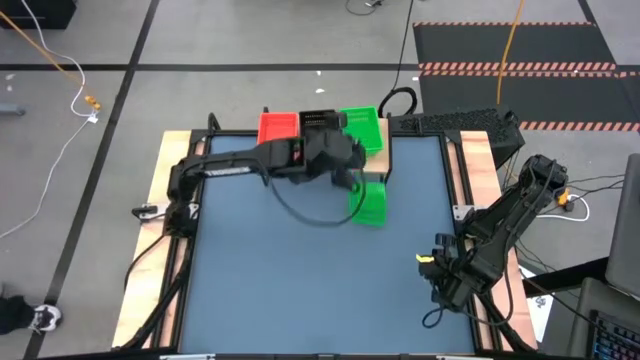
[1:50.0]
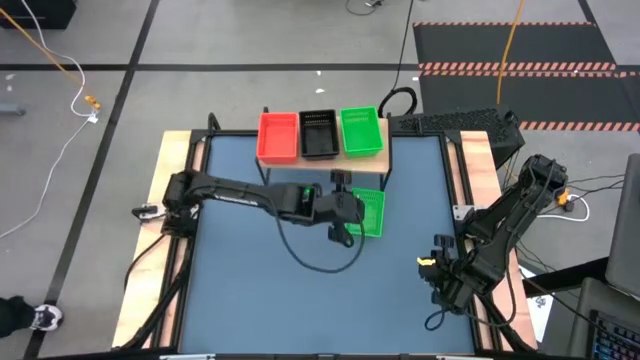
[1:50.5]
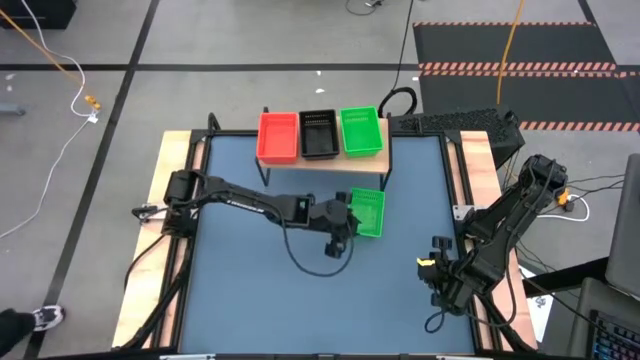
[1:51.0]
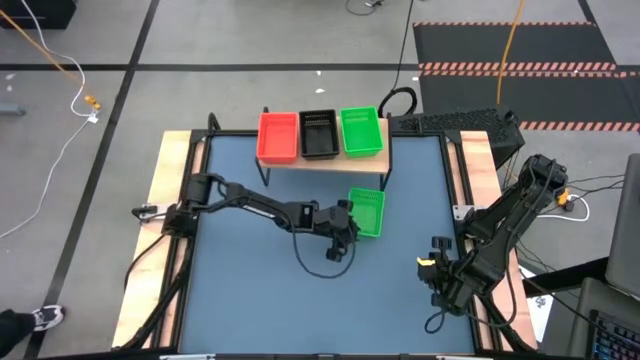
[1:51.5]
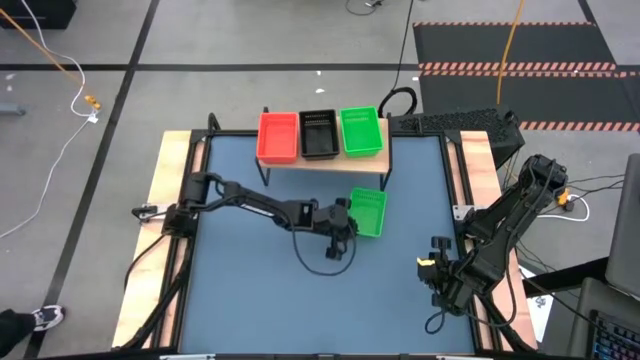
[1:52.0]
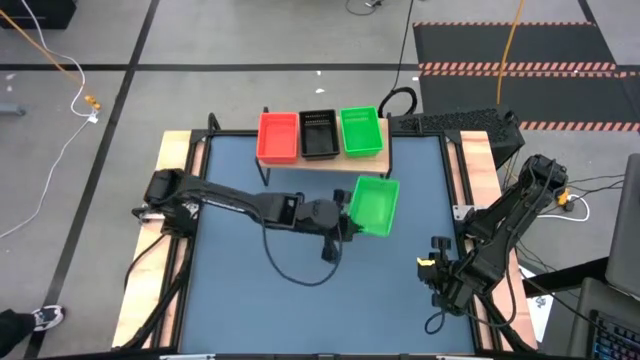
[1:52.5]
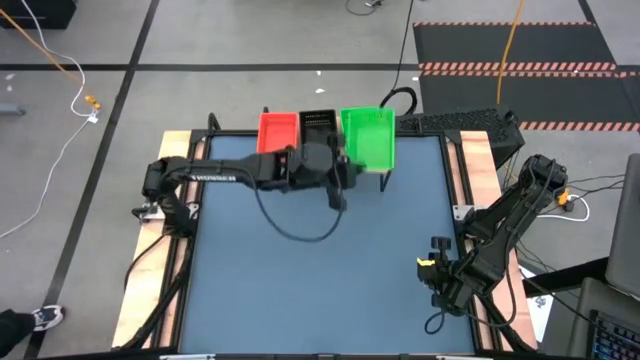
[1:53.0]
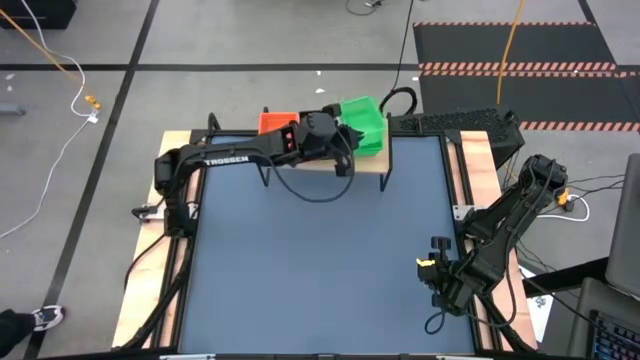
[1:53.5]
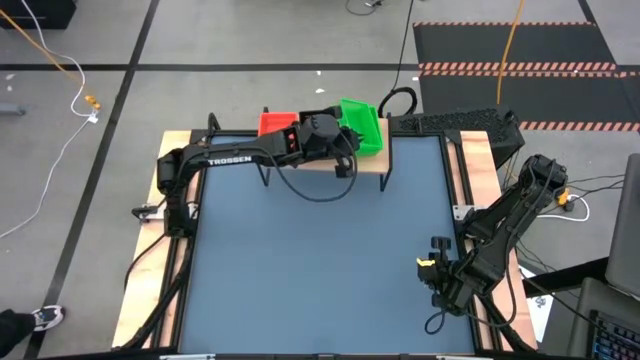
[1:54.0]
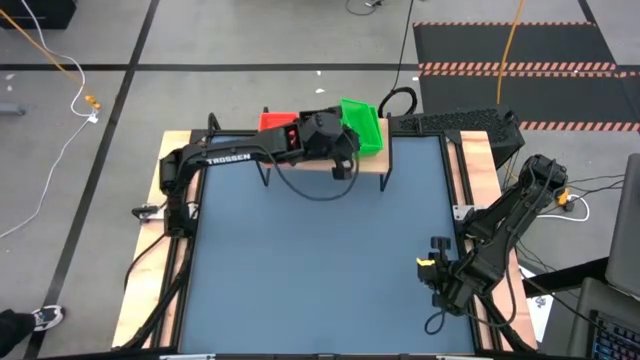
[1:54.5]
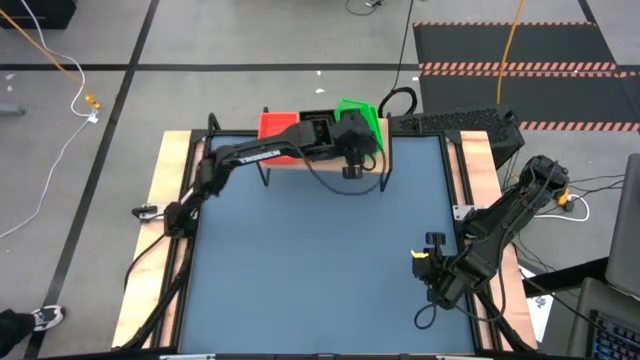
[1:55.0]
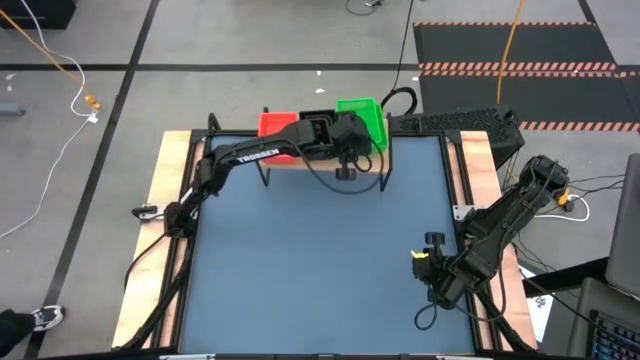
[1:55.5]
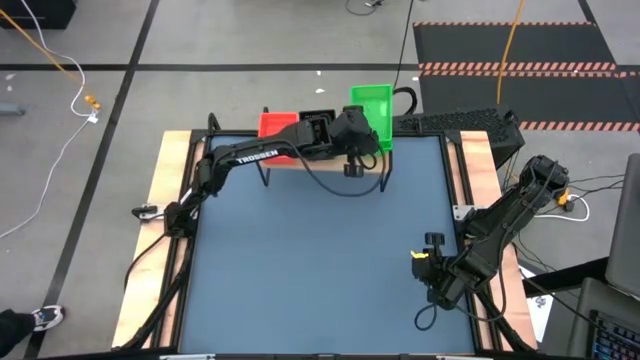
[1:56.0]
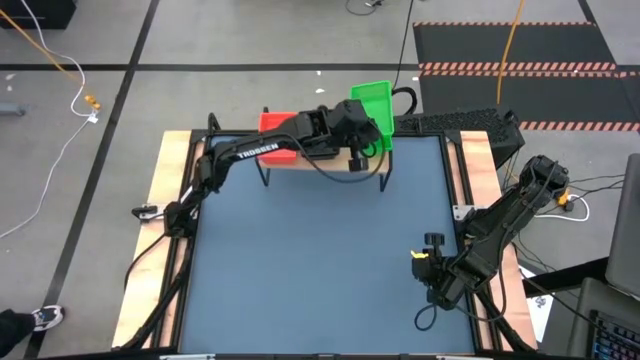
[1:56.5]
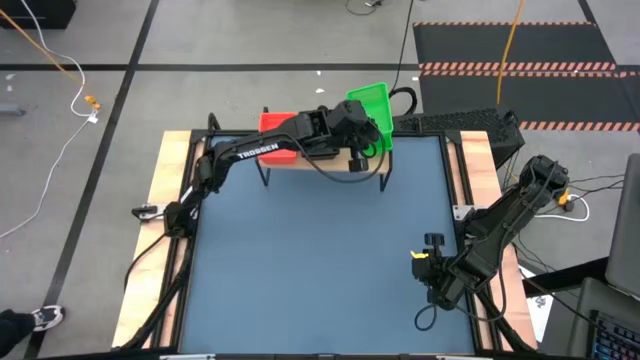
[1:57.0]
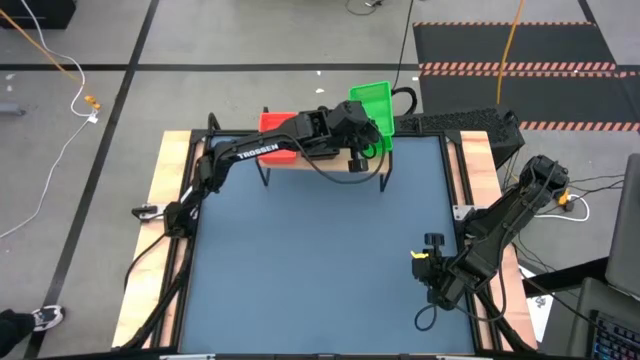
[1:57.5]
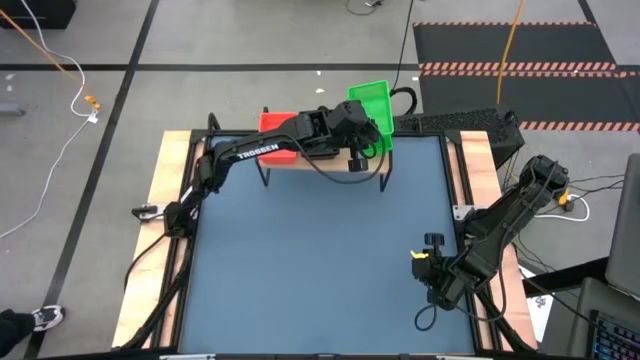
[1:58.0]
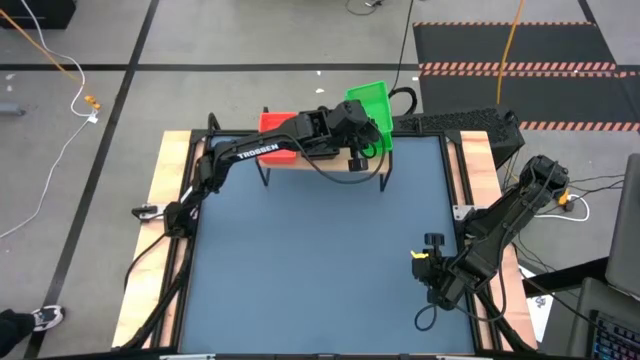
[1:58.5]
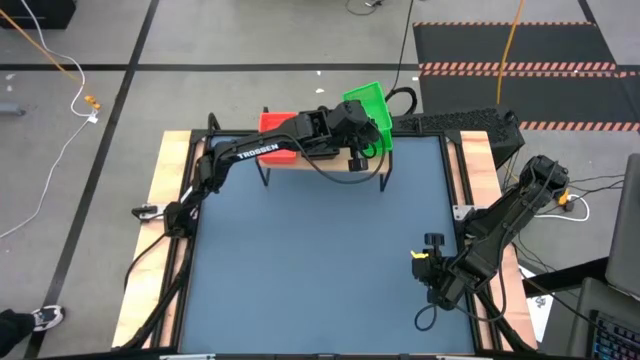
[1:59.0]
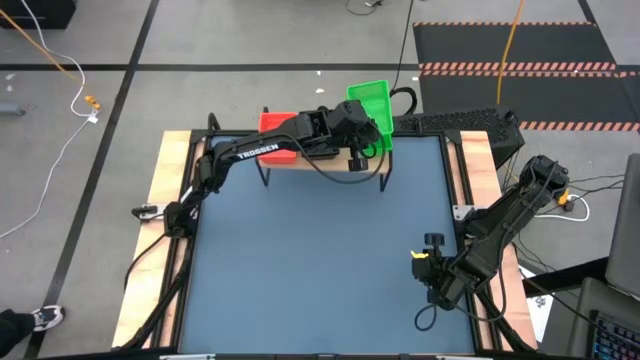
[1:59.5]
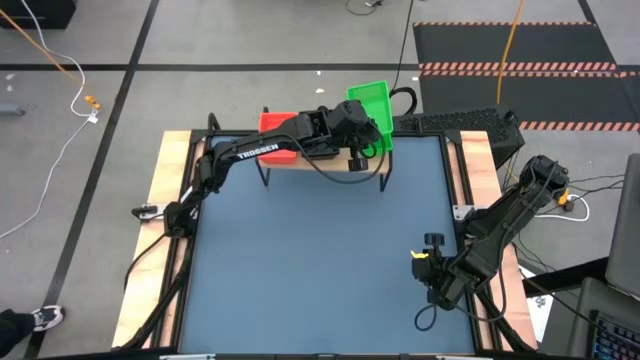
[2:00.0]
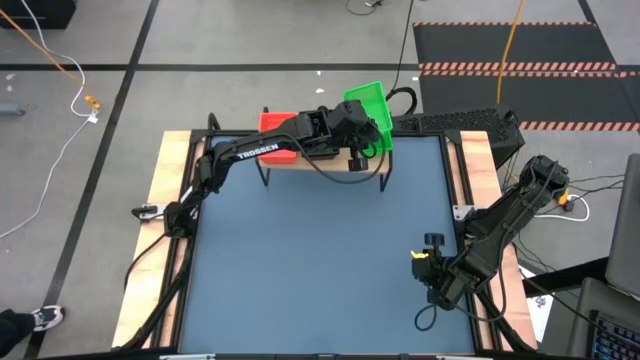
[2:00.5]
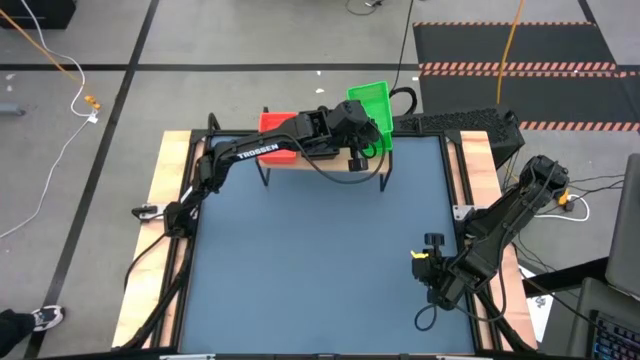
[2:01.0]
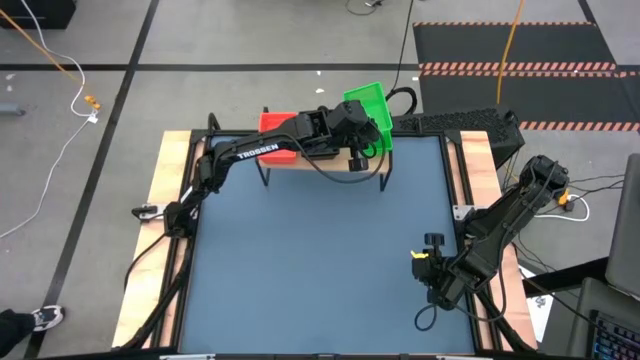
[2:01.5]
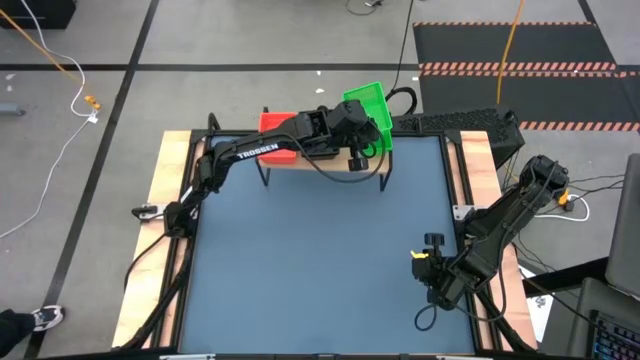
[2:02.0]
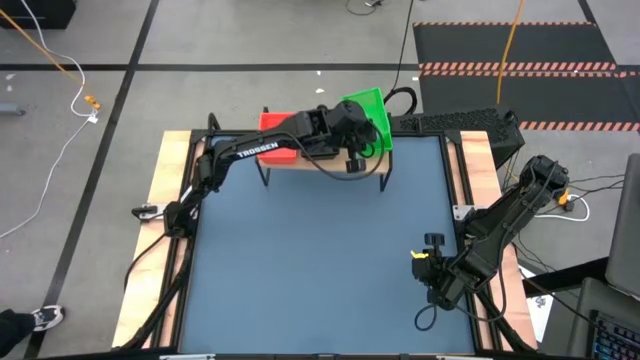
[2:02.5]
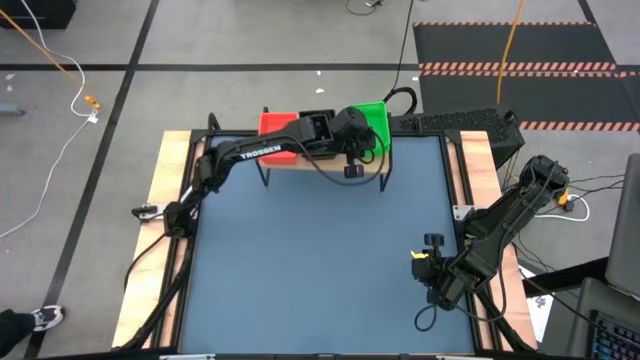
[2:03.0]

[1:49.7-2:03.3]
Task: Stack baskets on shelf by color
Stack the green bin on the other green bins on the shelf

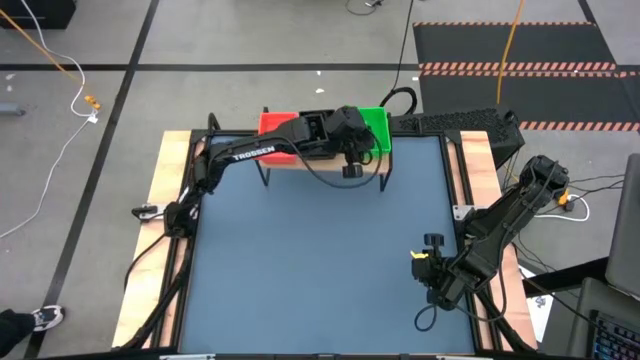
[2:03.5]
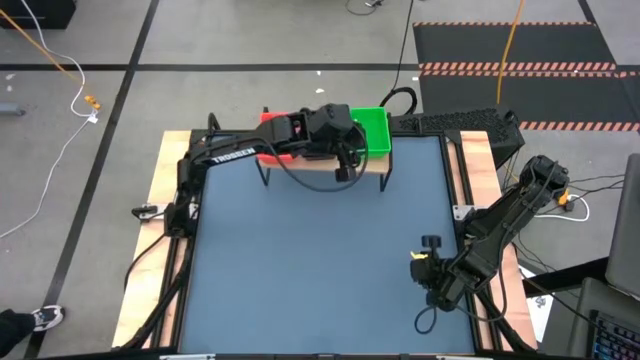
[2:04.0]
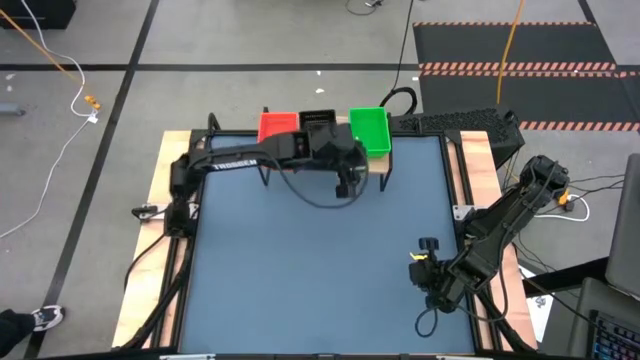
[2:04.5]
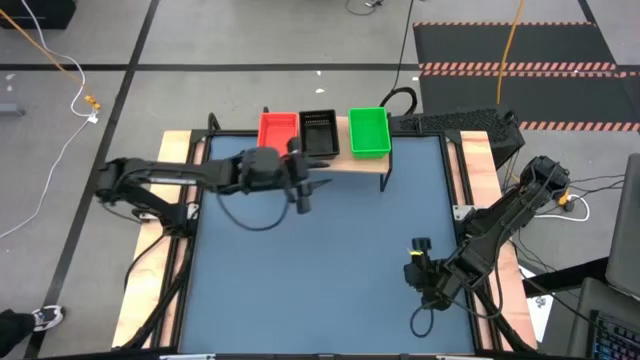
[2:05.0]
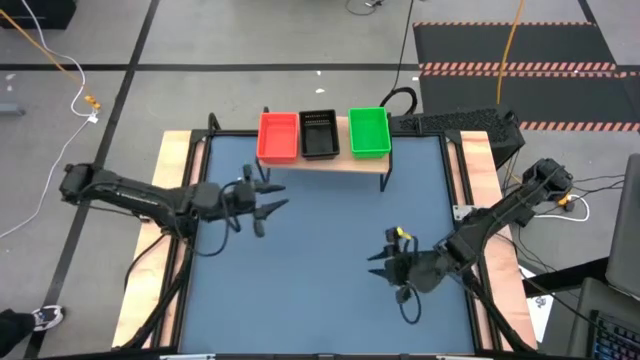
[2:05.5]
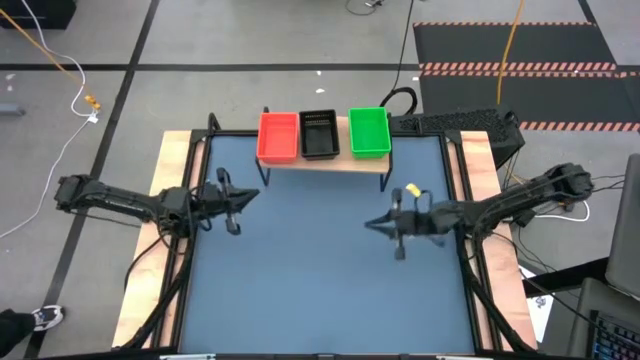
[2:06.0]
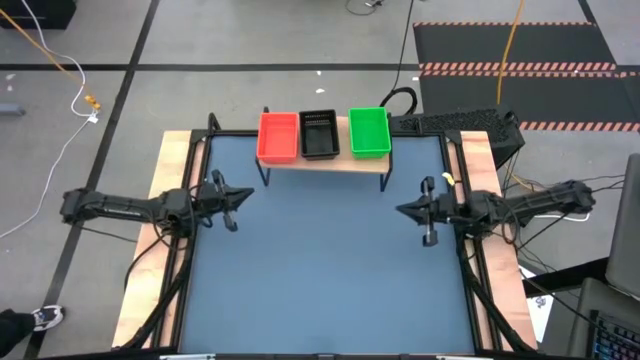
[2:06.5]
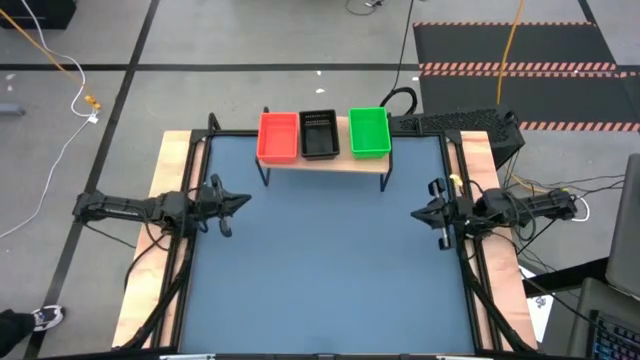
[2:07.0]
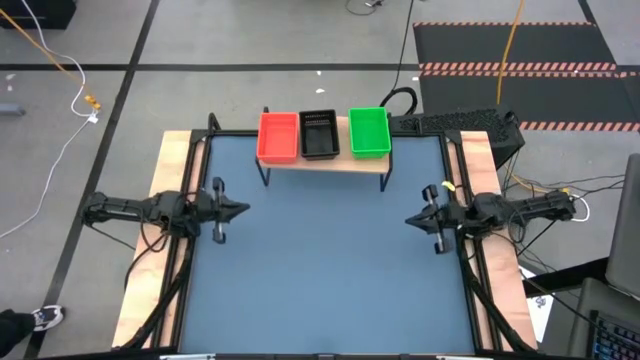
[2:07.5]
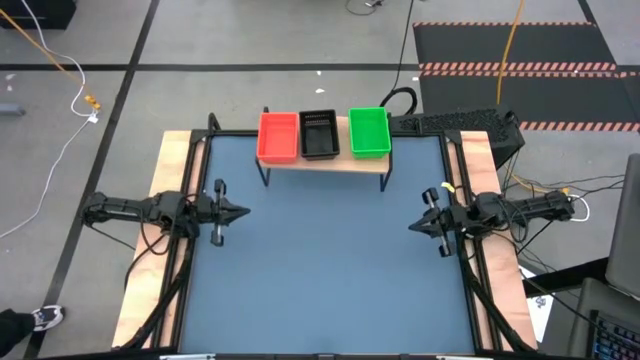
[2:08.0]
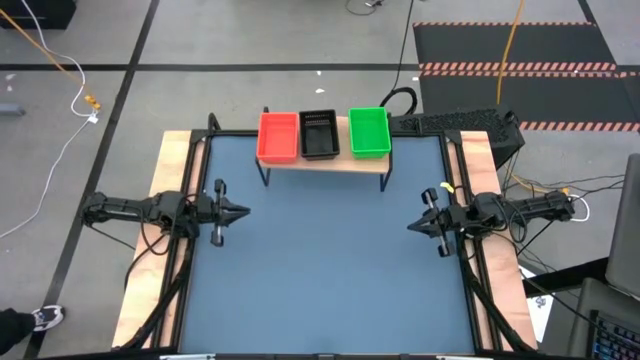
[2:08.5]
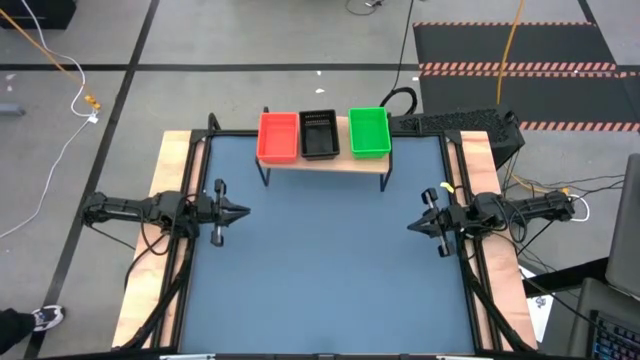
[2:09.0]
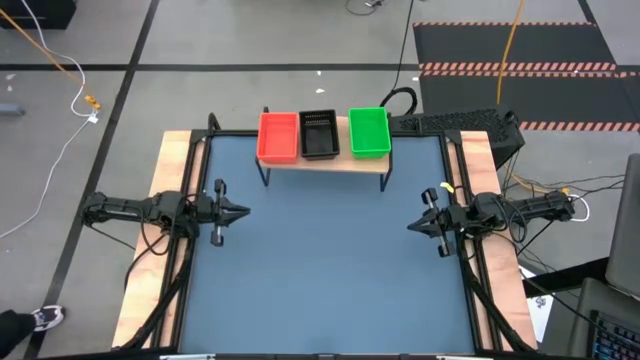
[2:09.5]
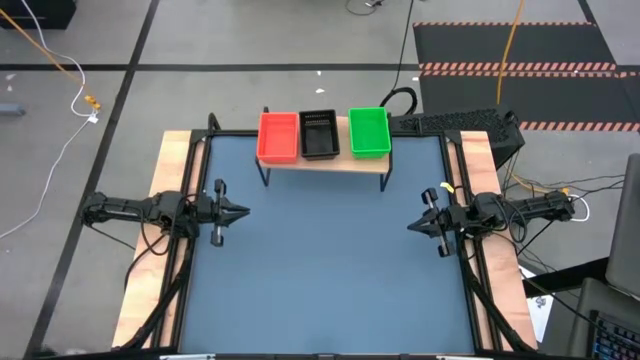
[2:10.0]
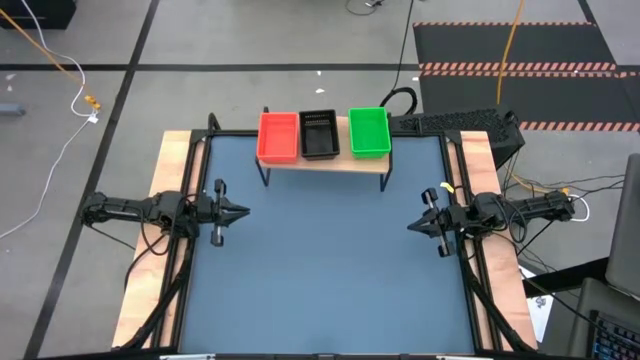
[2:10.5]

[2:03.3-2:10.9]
Return to Home Position
